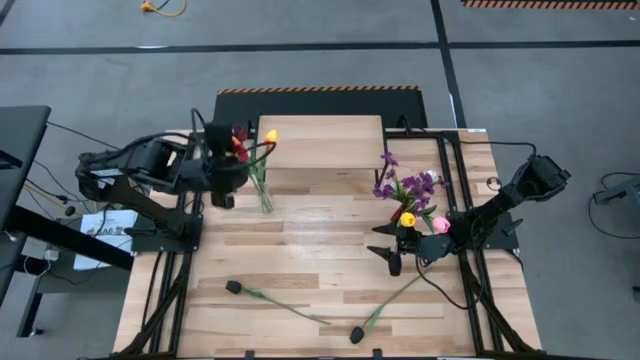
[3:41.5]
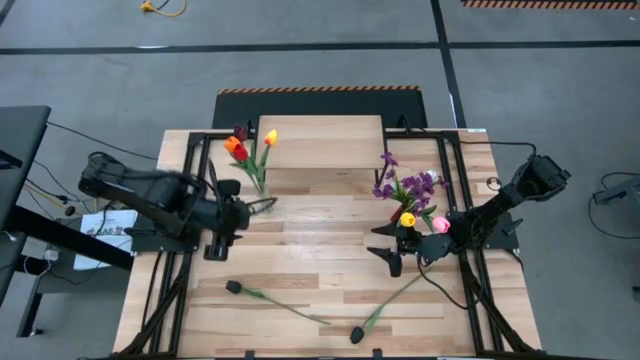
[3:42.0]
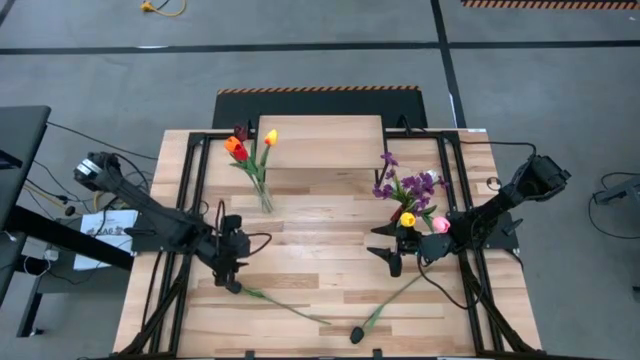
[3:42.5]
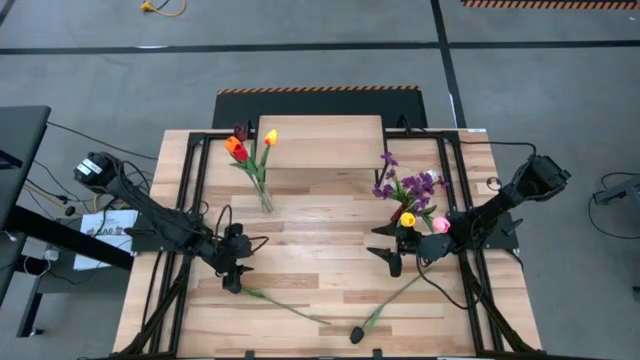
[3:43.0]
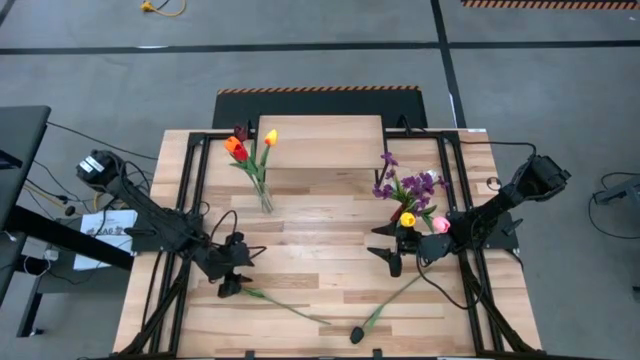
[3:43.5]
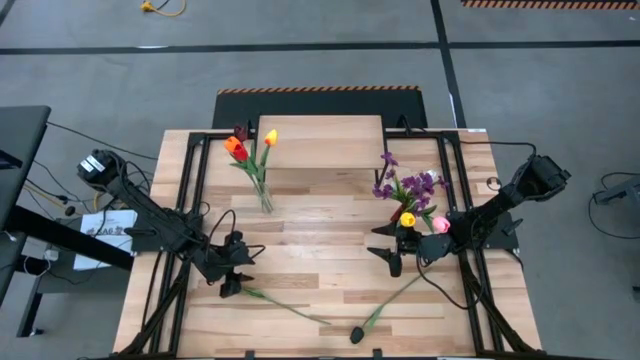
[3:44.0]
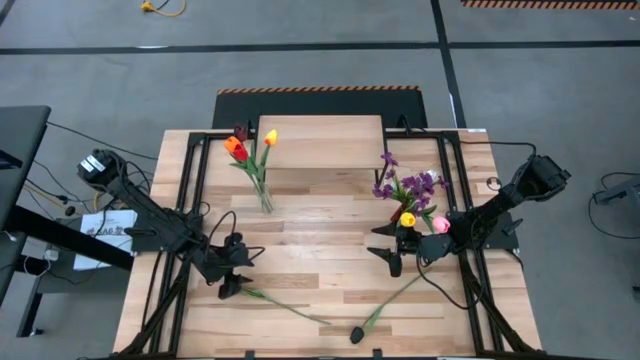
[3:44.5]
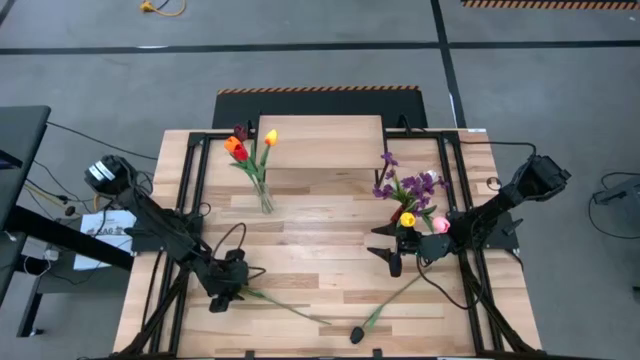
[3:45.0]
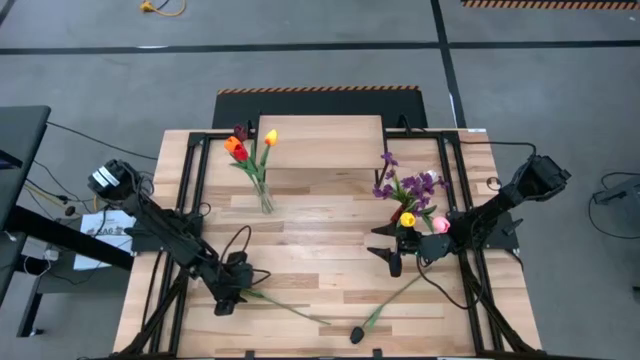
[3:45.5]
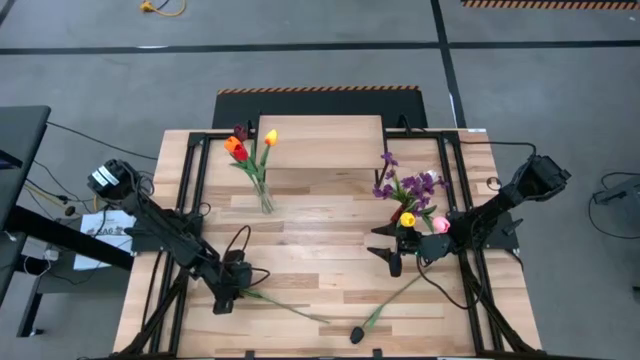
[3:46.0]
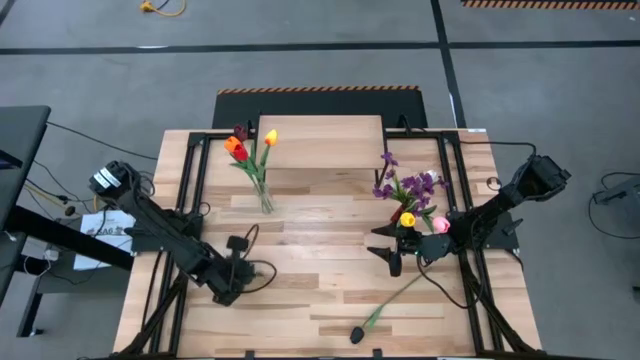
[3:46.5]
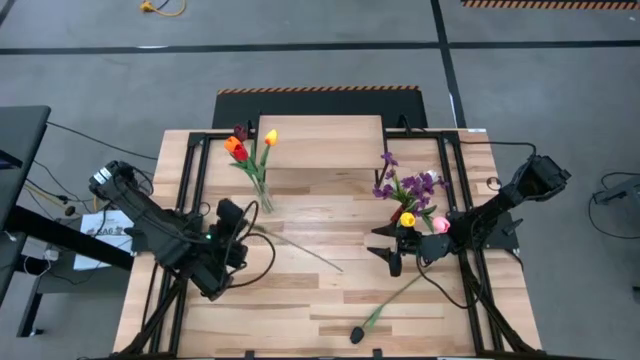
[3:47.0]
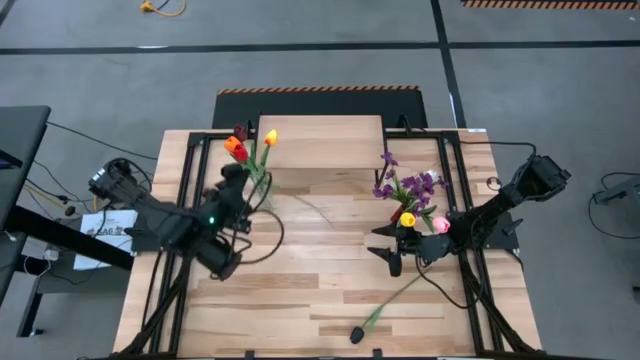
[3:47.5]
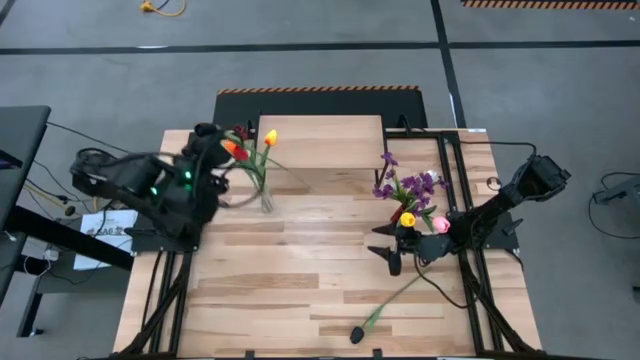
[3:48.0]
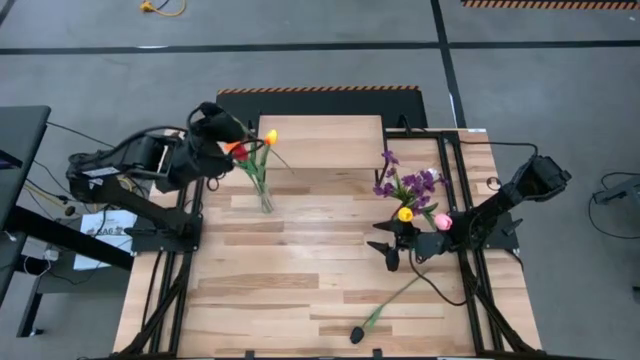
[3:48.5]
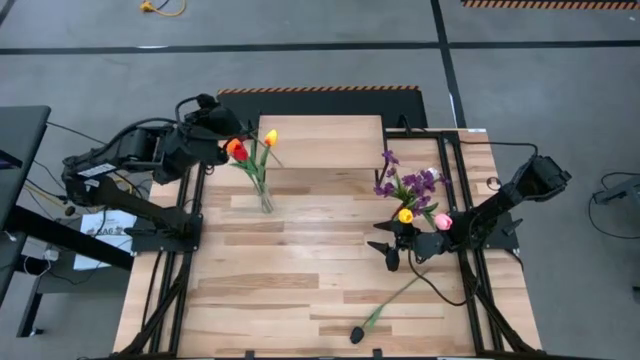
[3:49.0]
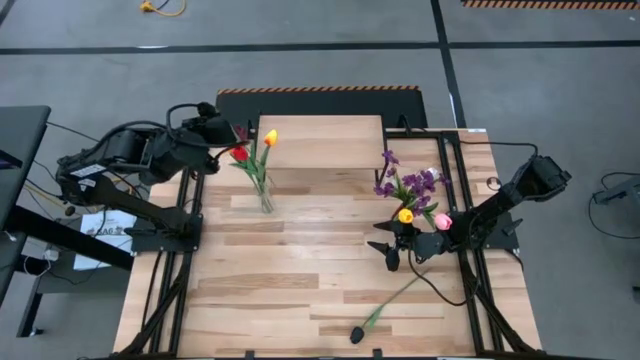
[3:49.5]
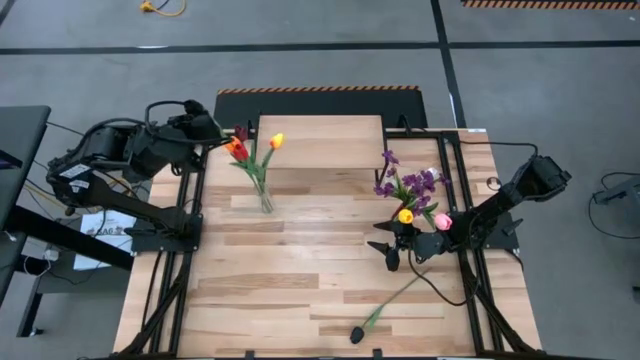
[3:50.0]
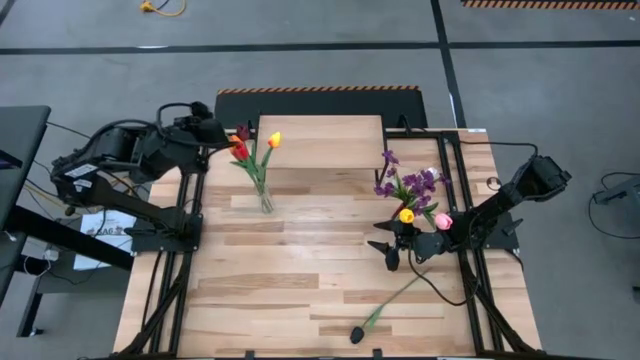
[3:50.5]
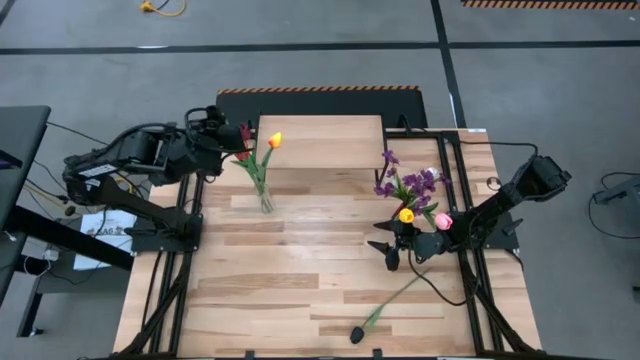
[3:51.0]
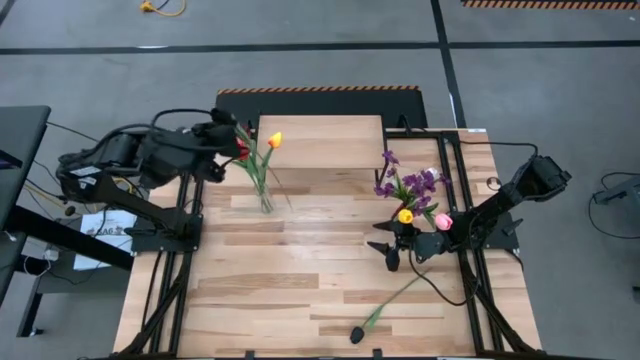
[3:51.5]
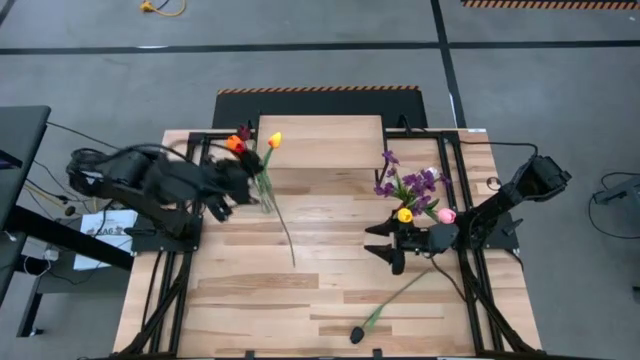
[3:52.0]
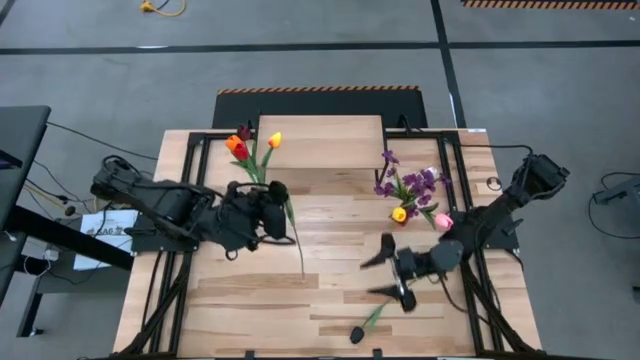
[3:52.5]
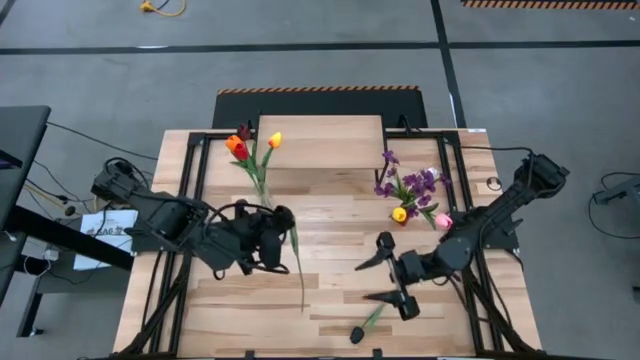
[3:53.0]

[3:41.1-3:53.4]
Task: Pick and place flowers into a vace then onto a shelf
Put the left black flower into the transparent vase

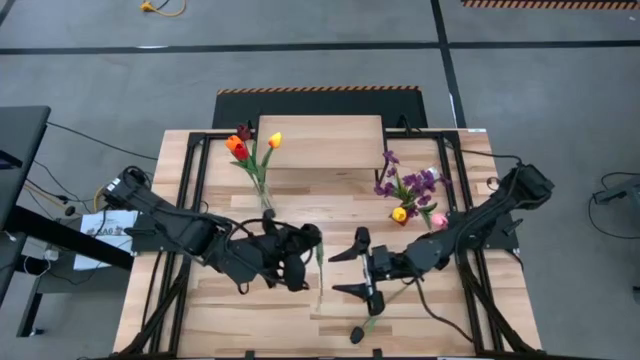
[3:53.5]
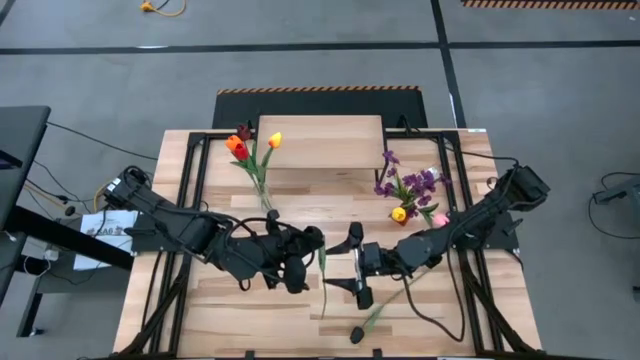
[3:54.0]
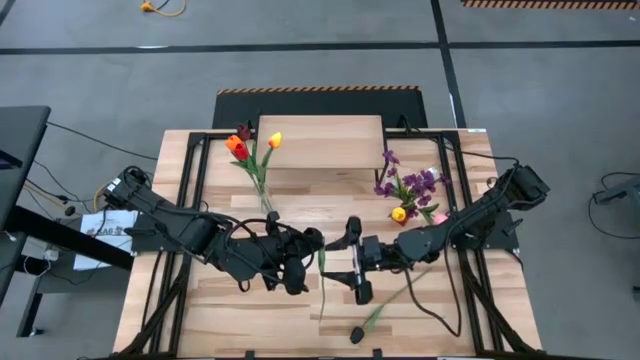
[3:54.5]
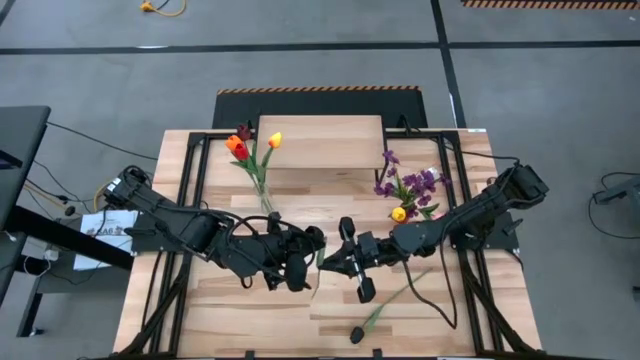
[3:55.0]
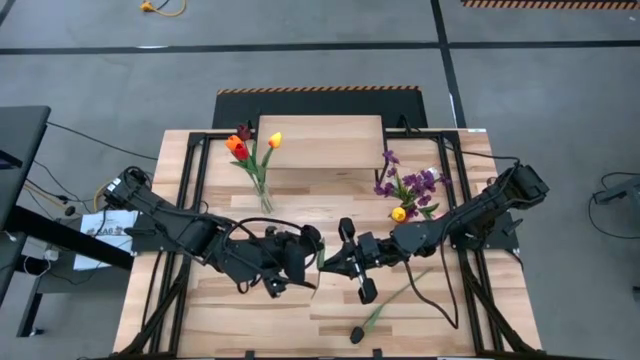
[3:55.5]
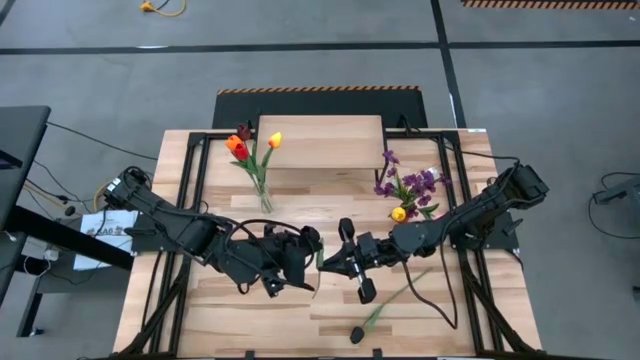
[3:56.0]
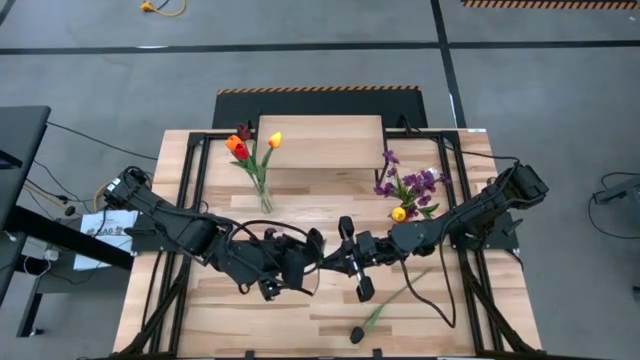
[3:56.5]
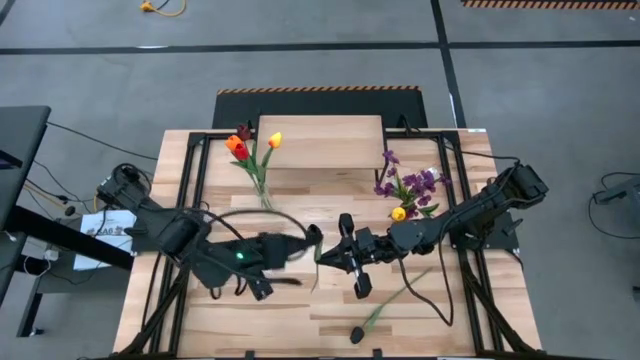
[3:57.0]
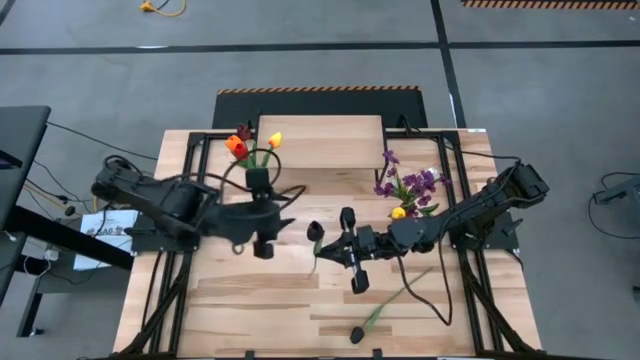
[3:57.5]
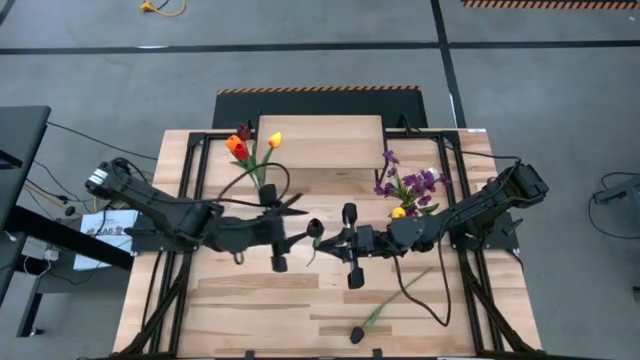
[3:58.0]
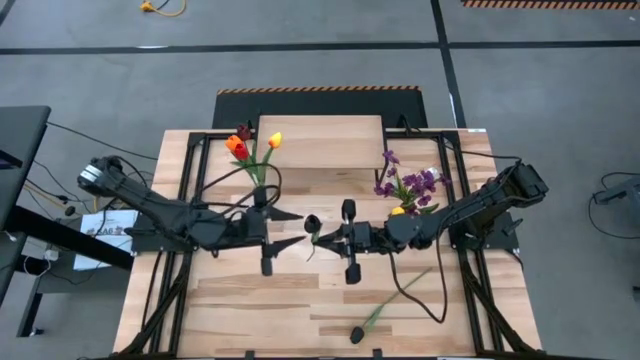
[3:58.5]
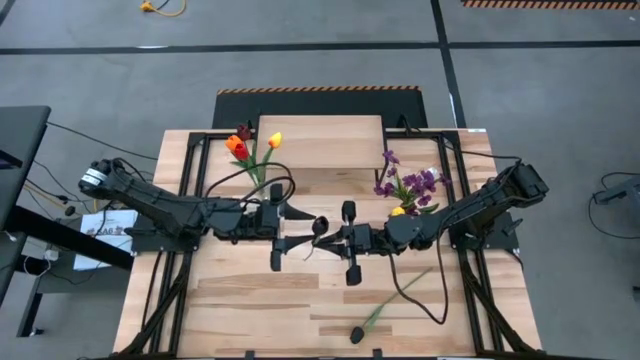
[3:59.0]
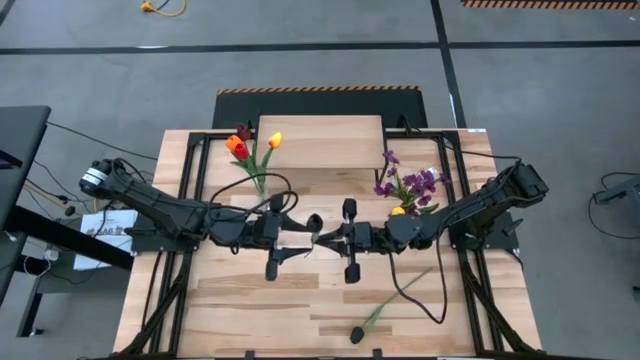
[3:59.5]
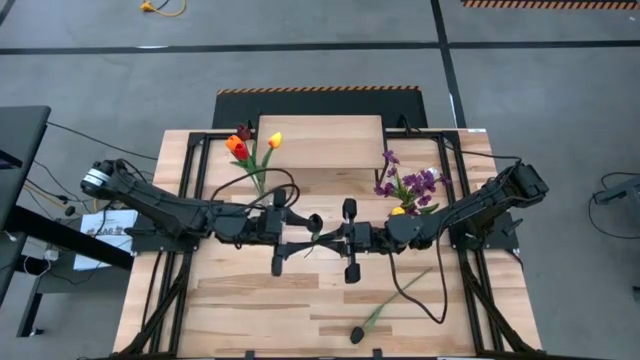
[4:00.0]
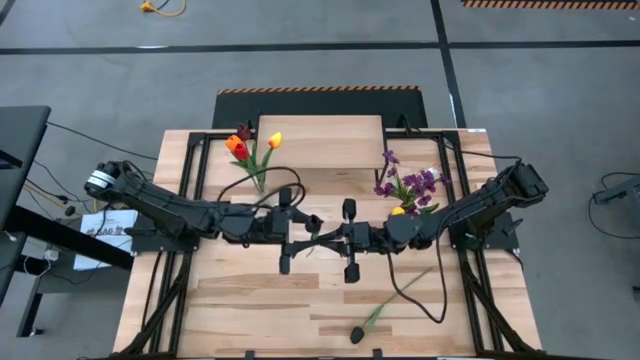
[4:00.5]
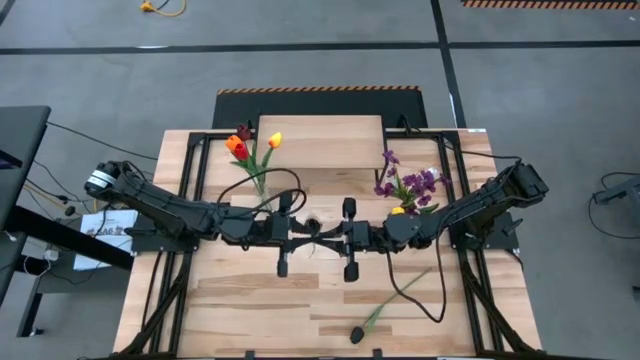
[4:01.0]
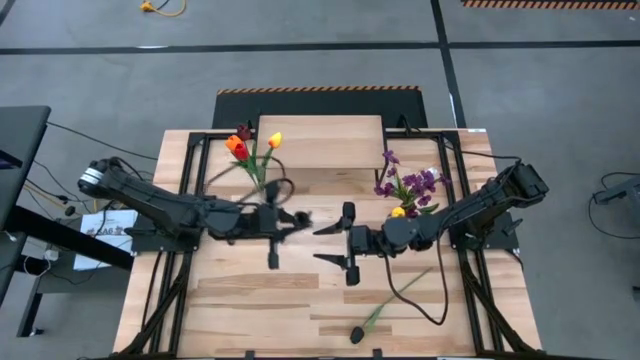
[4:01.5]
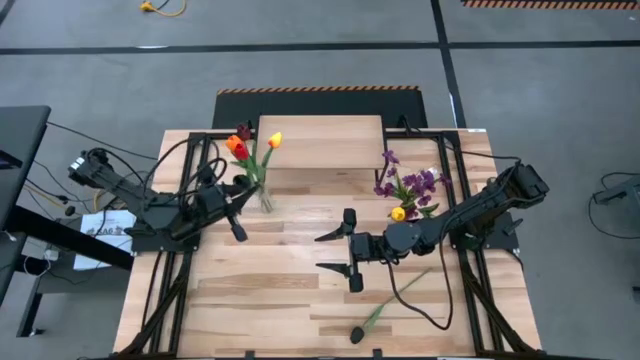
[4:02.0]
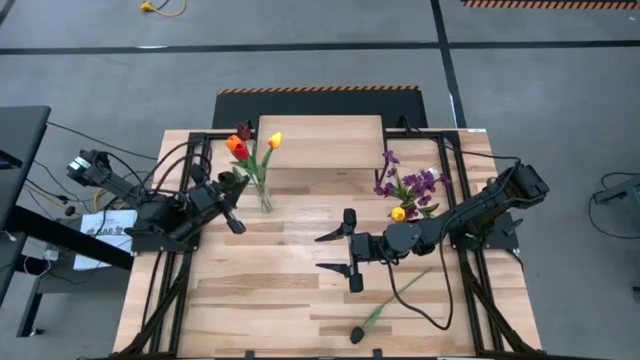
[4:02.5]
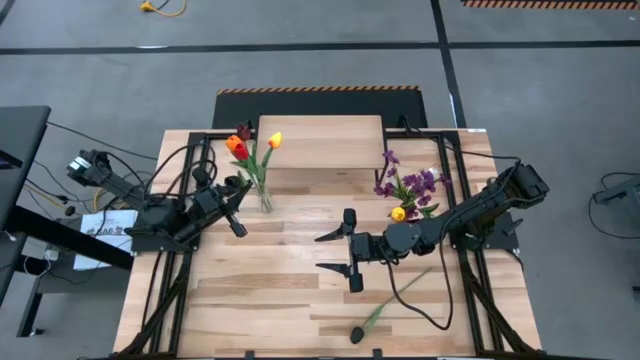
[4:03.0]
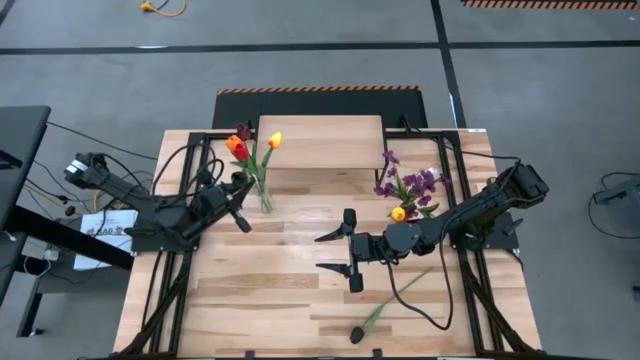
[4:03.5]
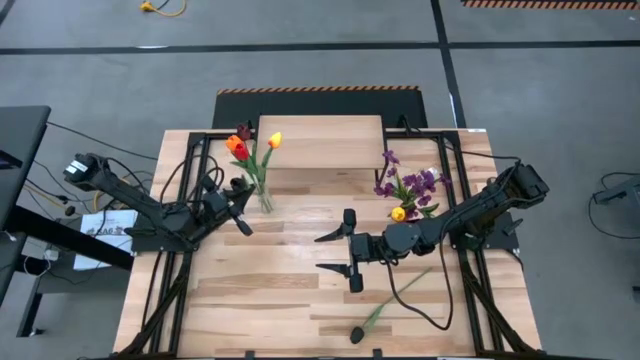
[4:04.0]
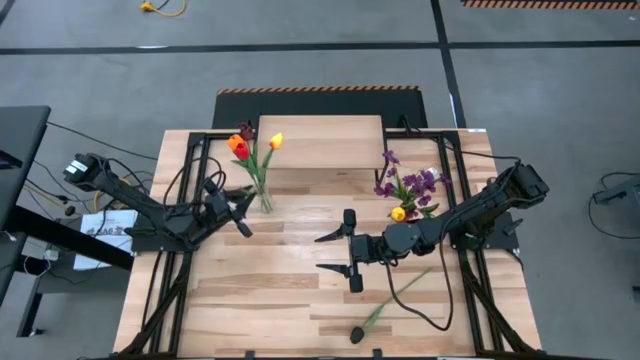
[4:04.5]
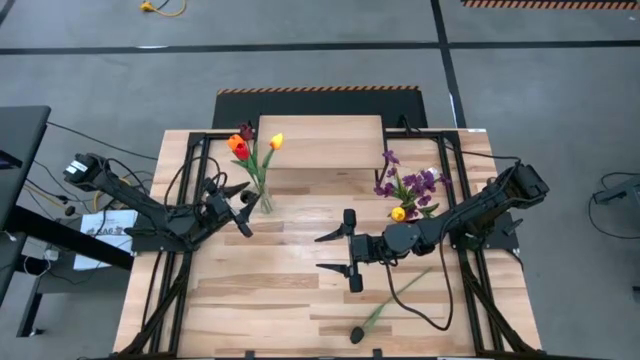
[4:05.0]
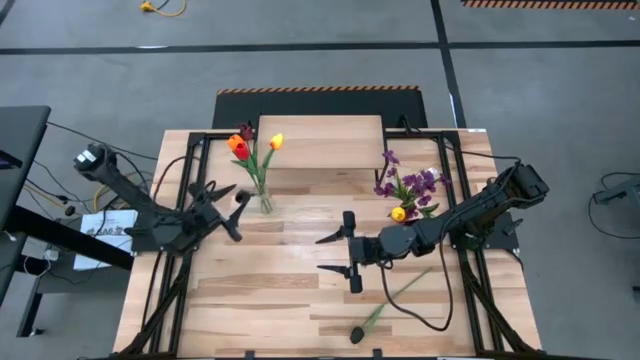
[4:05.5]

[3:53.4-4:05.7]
Put the left black flower into the transparent vase
